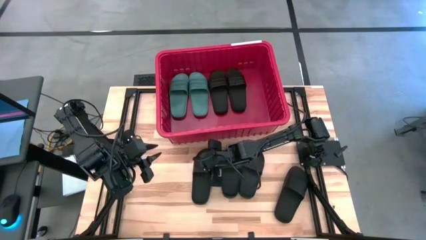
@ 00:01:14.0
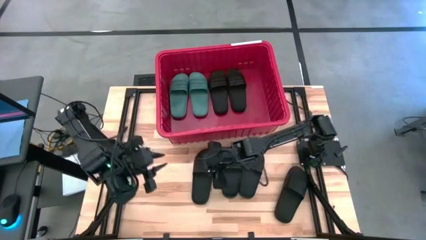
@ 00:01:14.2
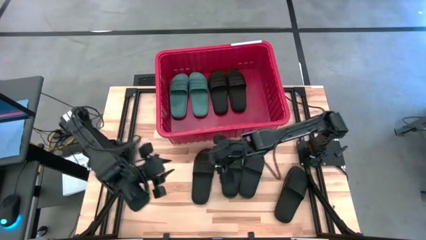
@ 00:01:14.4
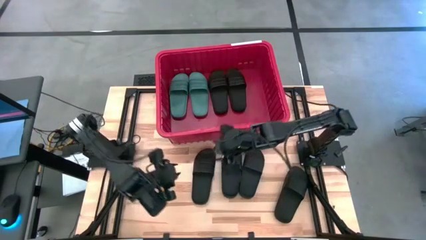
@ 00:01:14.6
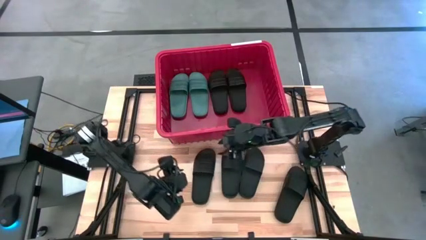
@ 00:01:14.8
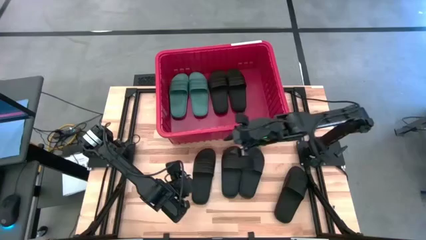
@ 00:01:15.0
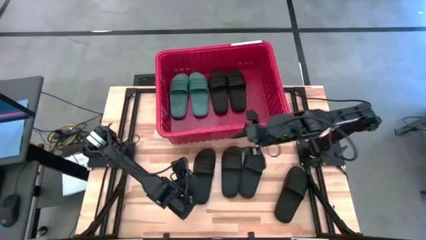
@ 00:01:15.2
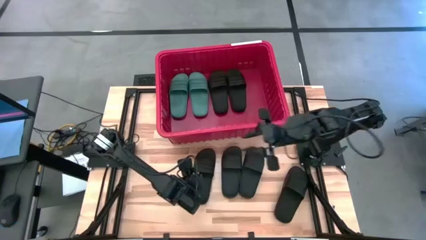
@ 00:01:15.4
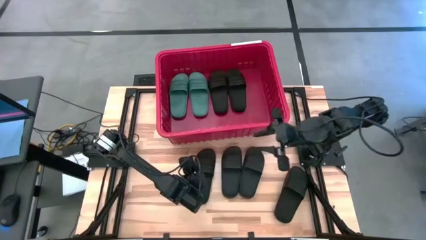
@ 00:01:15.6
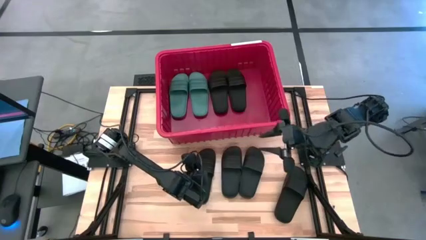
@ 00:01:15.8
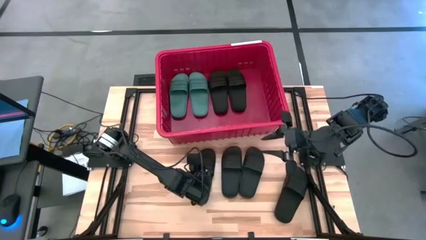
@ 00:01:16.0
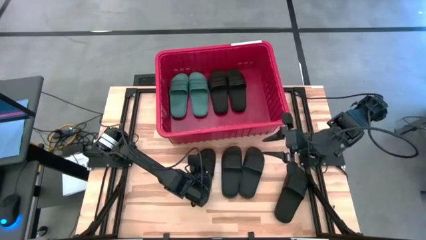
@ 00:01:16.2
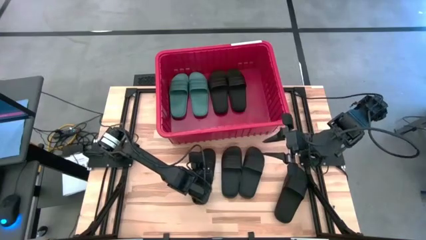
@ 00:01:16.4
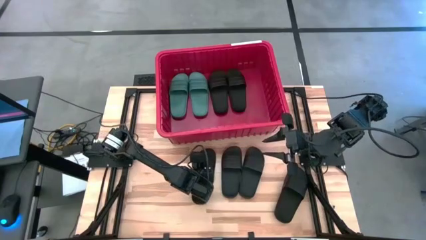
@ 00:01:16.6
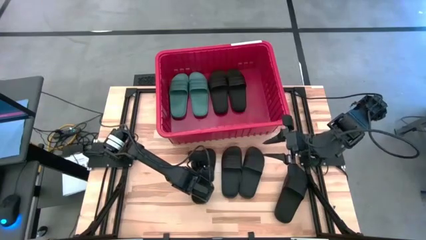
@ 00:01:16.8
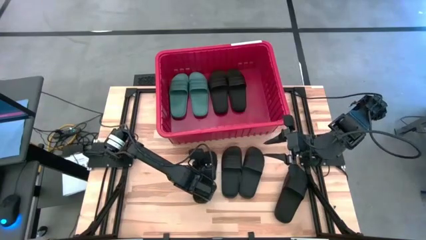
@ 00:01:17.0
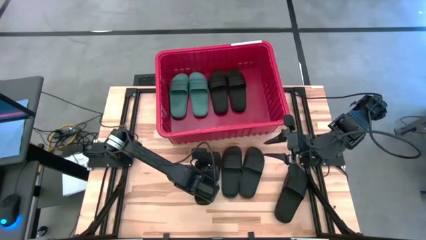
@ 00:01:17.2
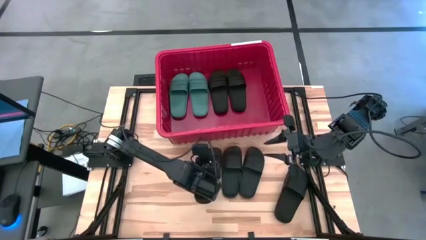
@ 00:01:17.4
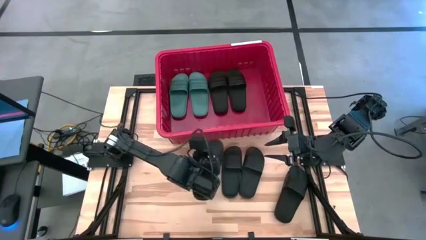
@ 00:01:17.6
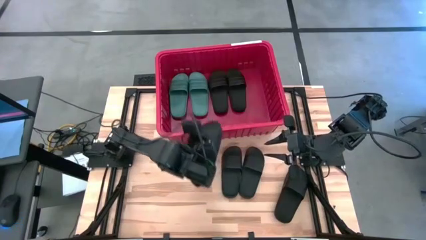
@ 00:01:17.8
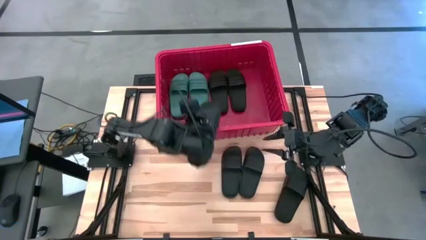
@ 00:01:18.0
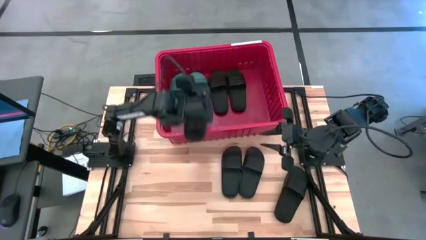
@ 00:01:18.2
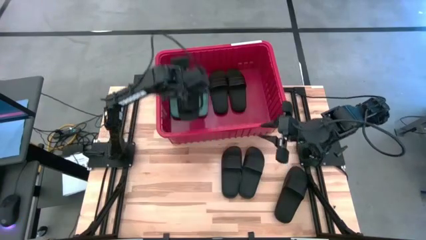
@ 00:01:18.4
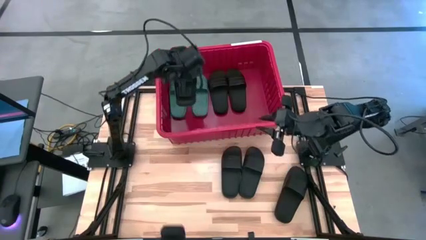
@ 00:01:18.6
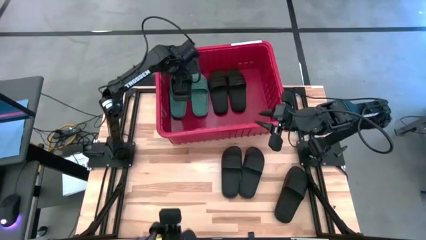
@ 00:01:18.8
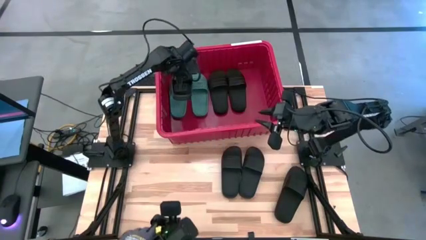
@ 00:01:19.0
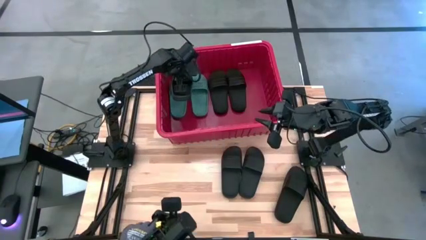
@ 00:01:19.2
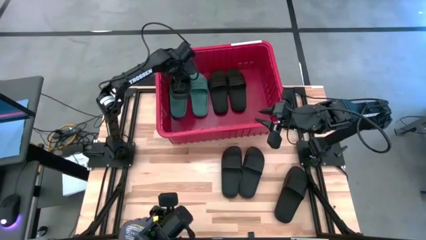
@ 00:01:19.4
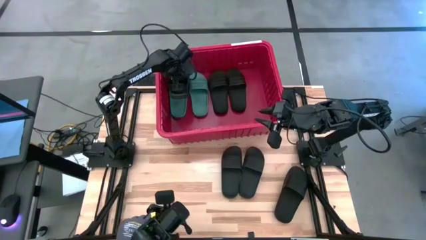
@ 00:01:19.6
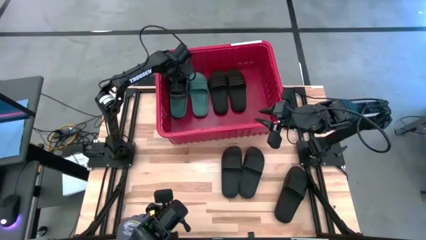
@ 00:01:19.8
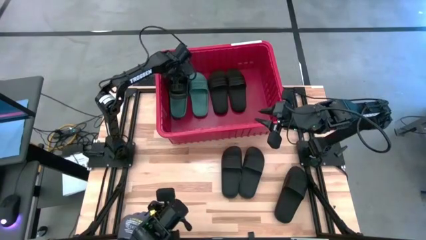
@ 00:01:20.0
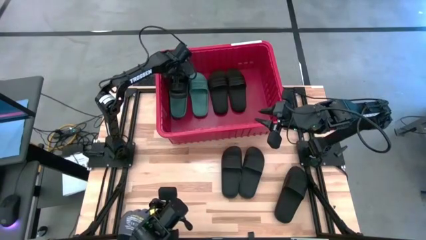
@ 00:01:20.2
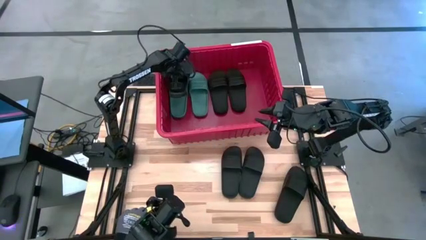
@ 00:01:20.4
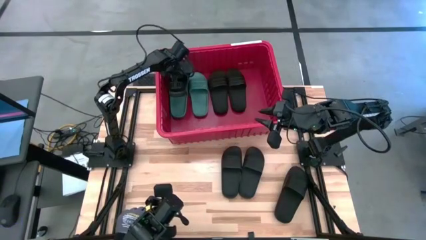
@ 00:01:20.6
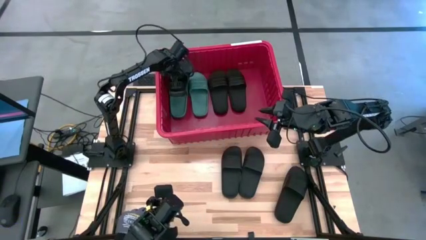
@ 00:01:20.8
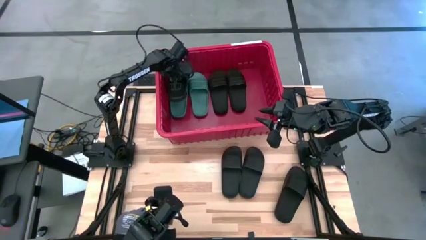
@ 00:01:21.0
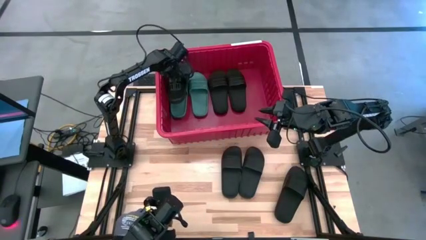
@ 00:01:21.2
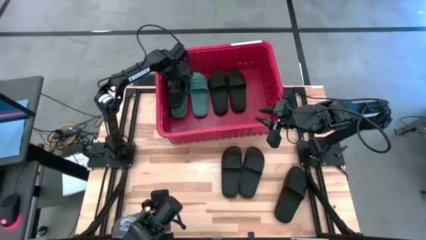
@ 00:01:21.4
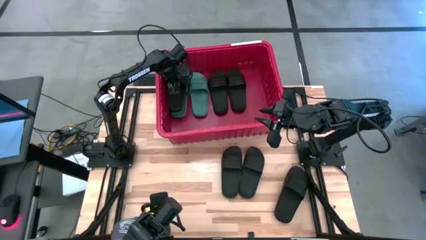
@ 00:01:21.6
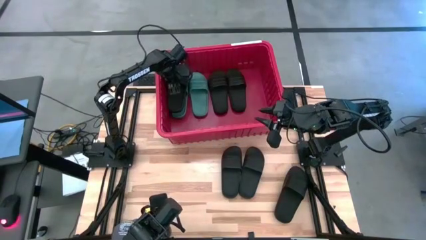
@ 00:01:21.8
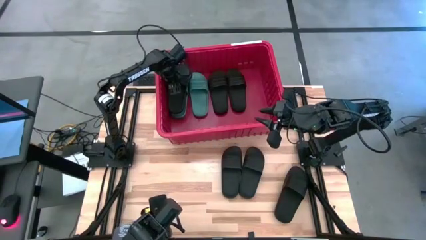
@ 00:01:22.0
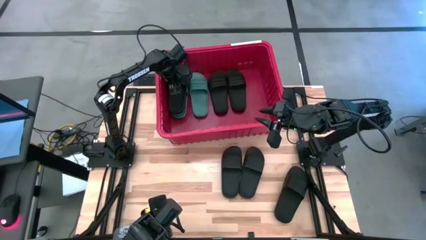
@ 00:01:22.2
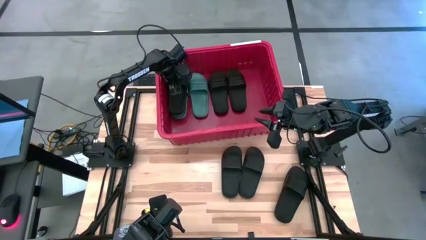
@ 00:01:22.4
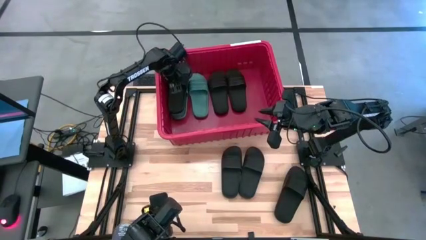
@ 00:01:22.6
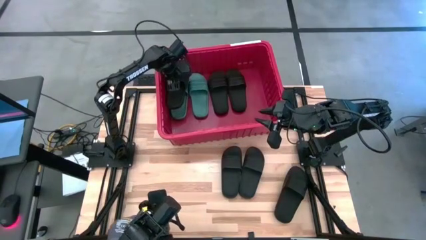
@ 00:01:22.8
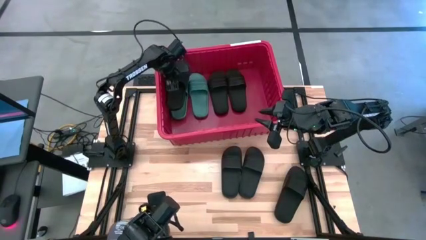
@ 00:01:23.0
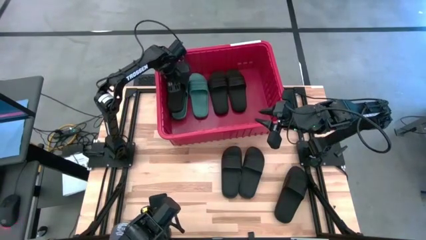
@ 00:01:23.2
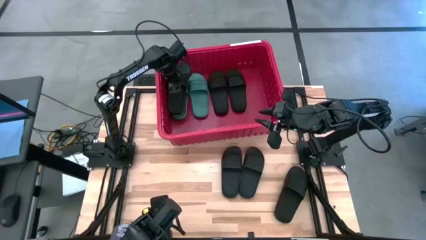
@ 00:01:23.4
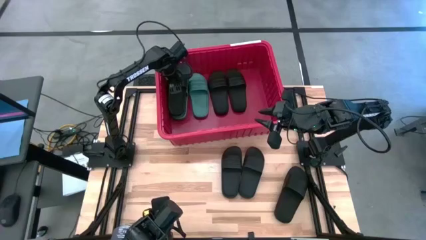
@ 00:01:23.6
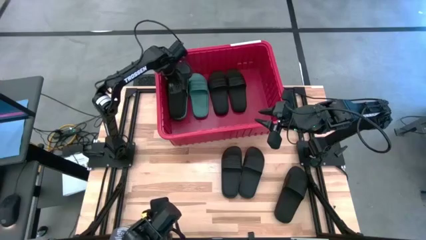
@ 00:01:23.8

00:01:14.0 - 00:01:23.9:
Task: Pick and place slides into bin
Put the black slipper into the red container
